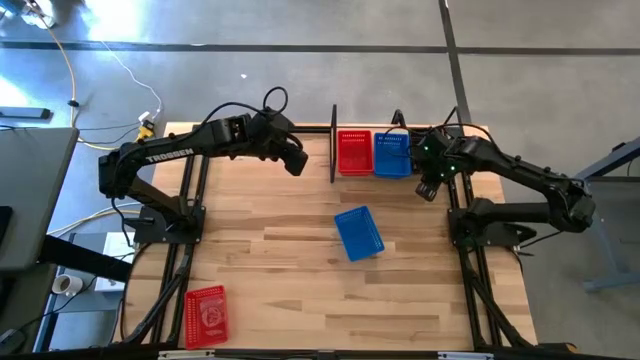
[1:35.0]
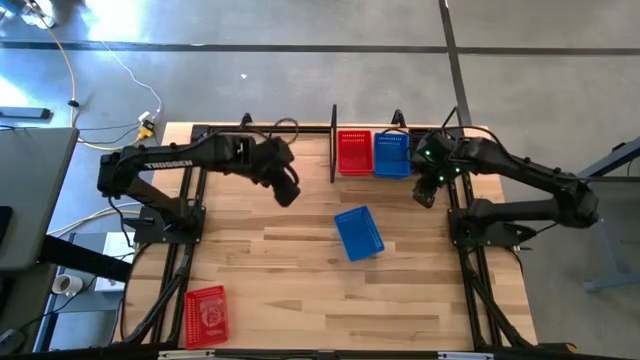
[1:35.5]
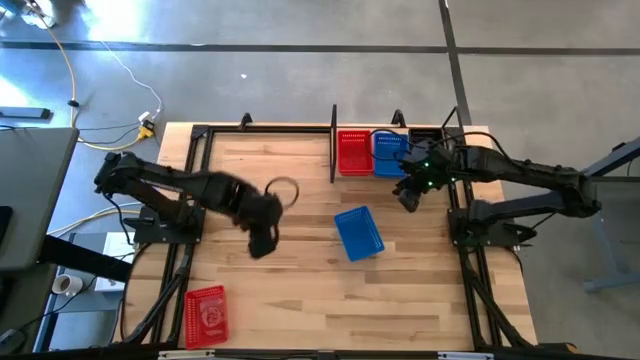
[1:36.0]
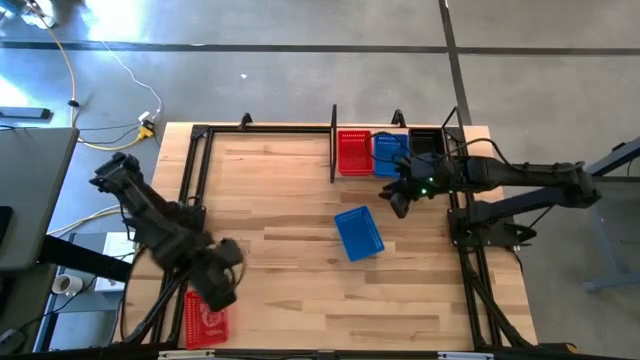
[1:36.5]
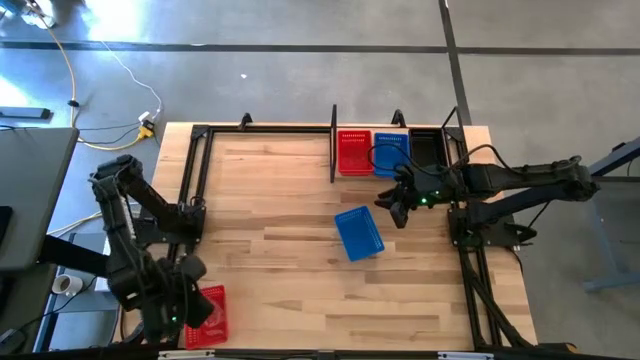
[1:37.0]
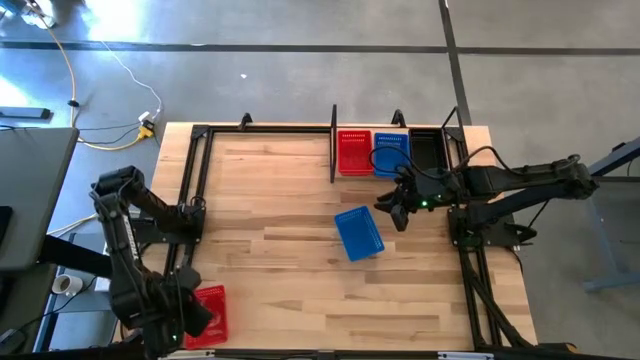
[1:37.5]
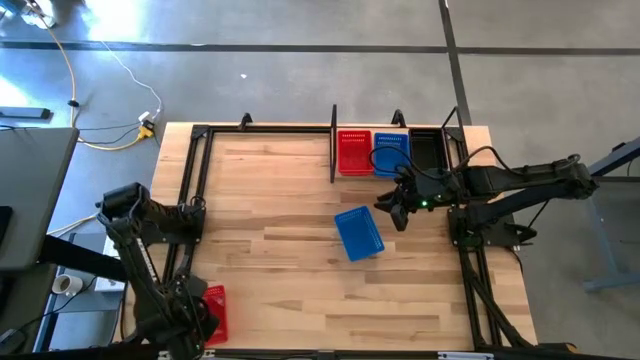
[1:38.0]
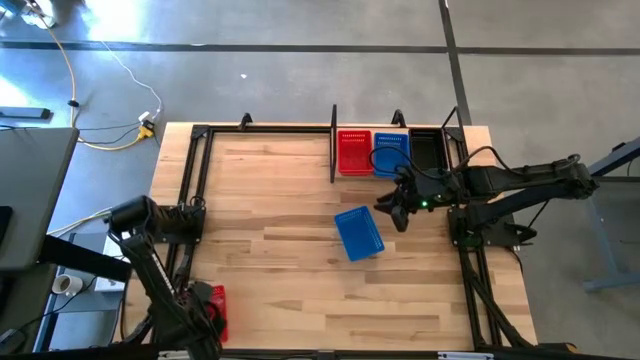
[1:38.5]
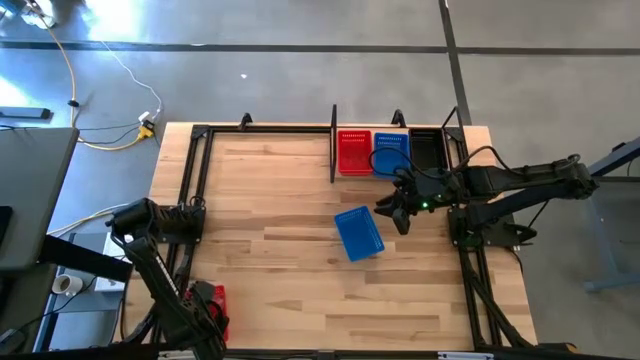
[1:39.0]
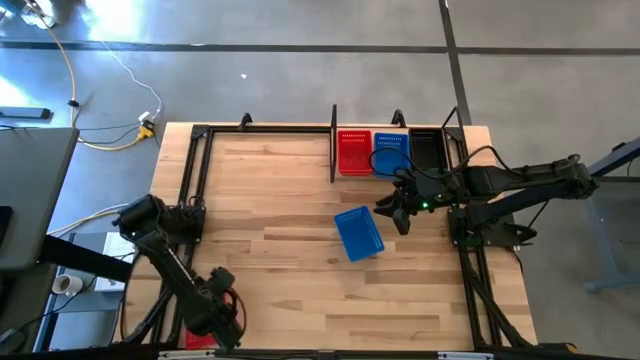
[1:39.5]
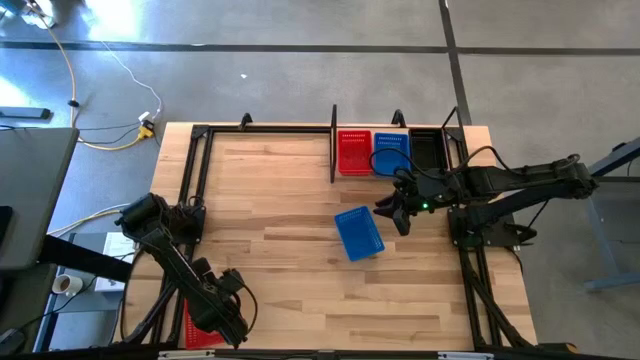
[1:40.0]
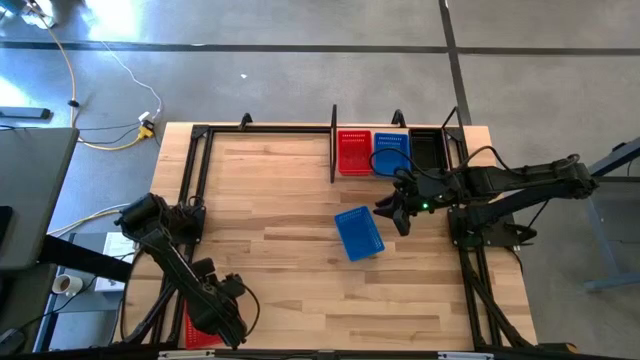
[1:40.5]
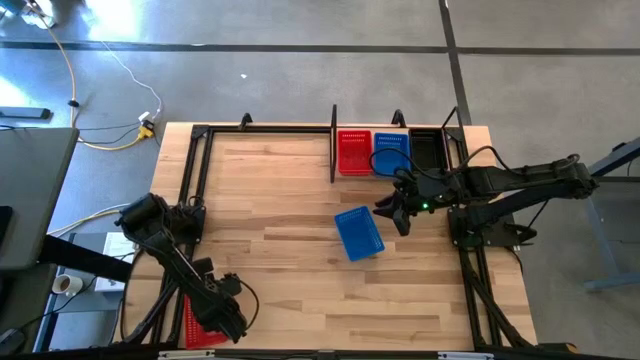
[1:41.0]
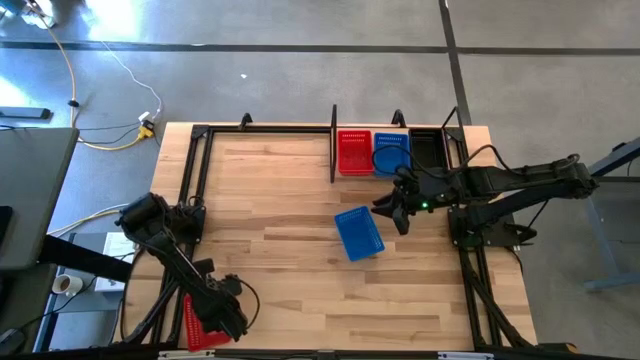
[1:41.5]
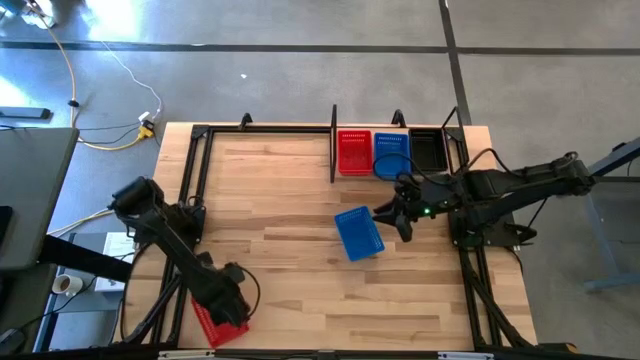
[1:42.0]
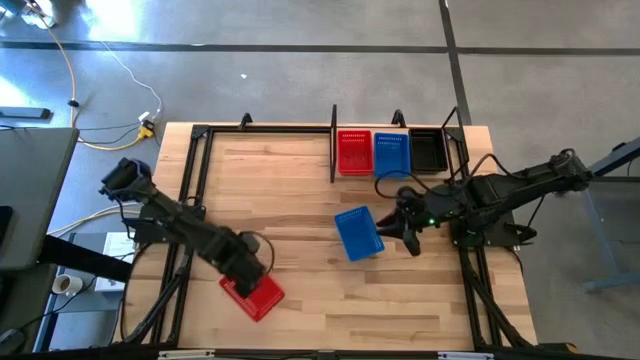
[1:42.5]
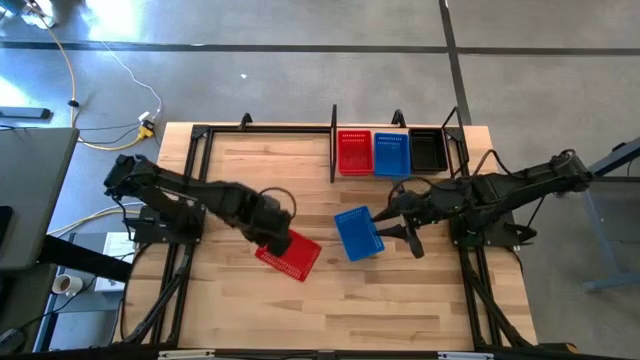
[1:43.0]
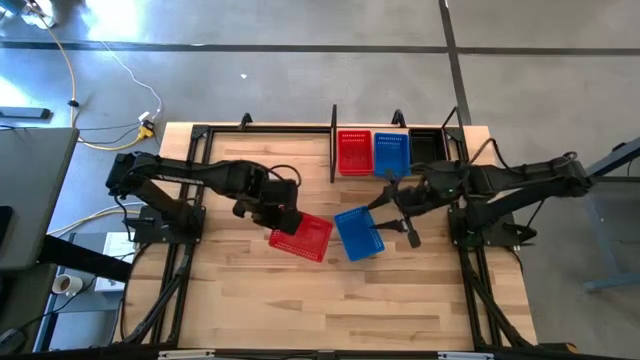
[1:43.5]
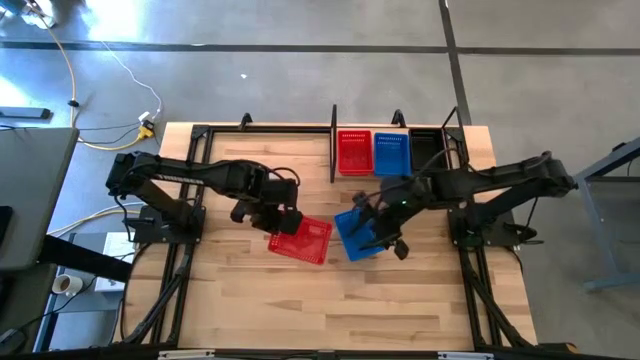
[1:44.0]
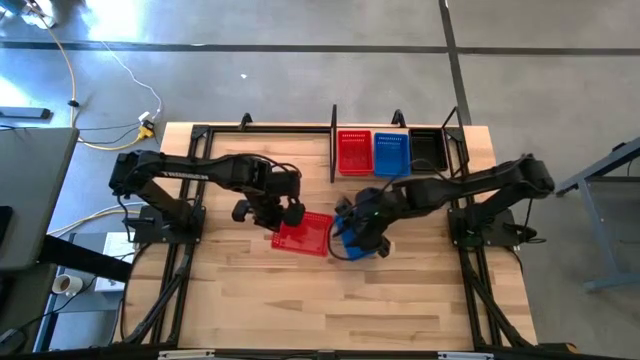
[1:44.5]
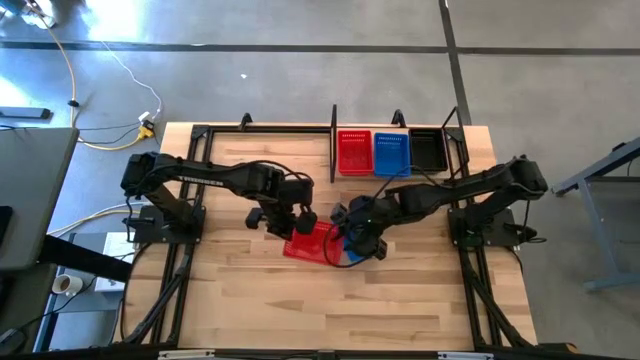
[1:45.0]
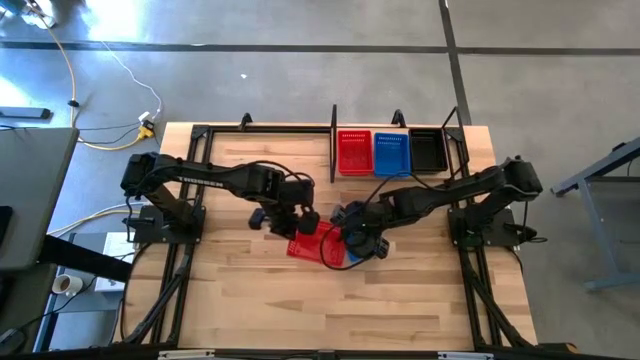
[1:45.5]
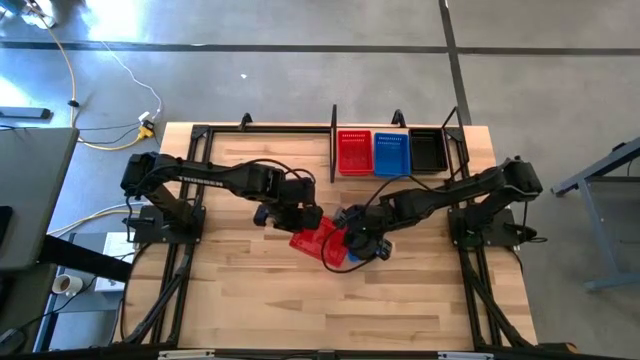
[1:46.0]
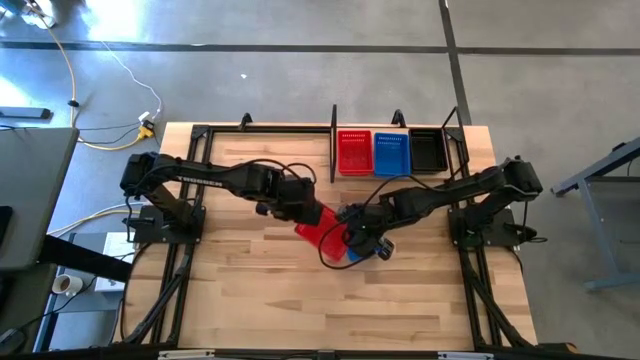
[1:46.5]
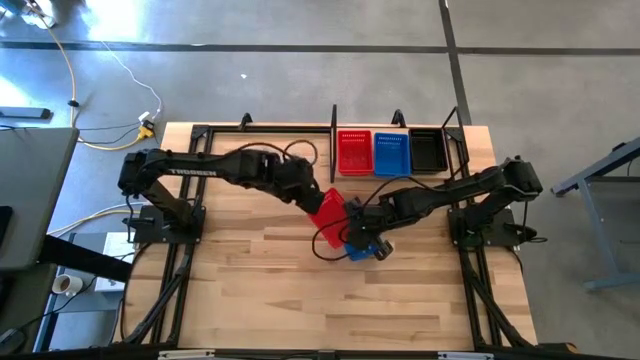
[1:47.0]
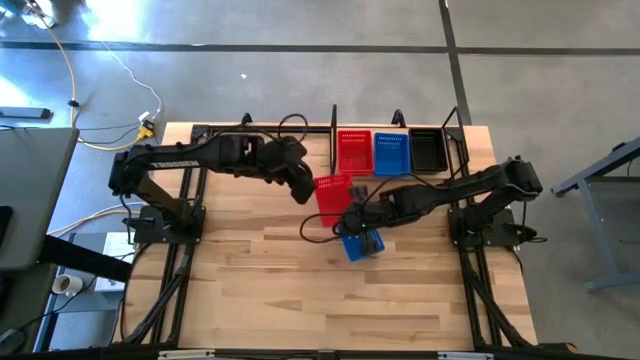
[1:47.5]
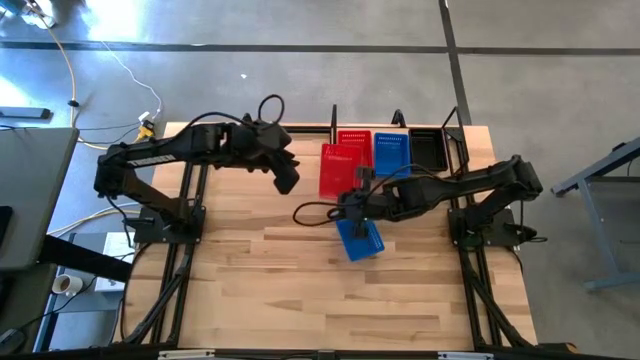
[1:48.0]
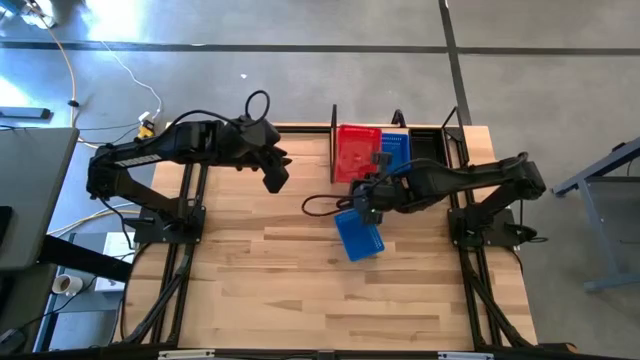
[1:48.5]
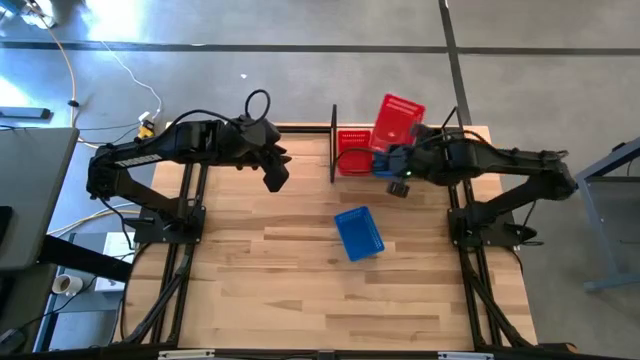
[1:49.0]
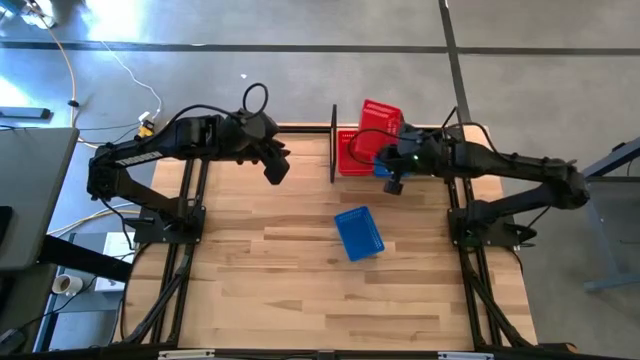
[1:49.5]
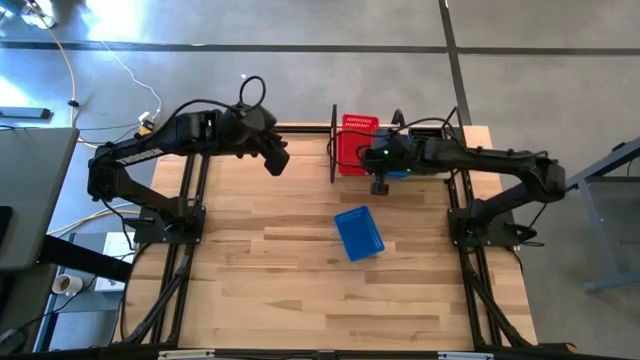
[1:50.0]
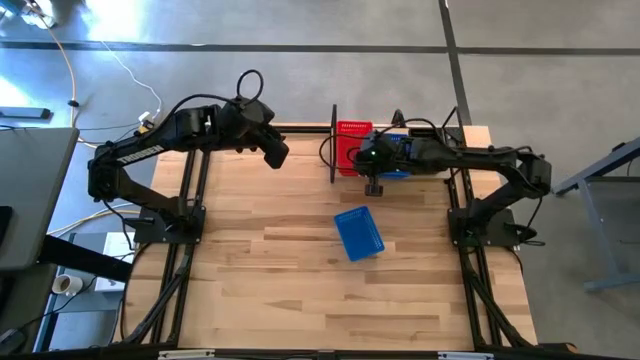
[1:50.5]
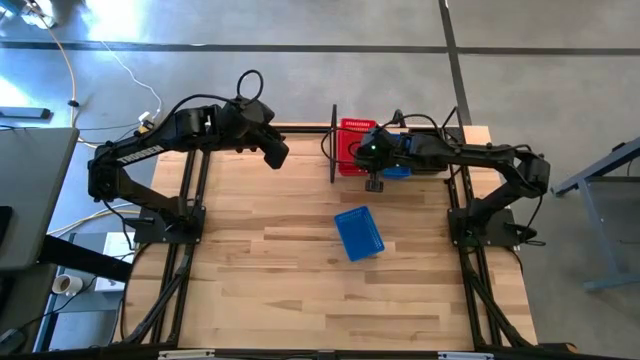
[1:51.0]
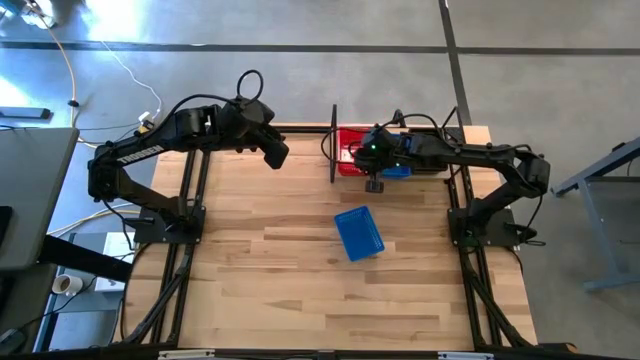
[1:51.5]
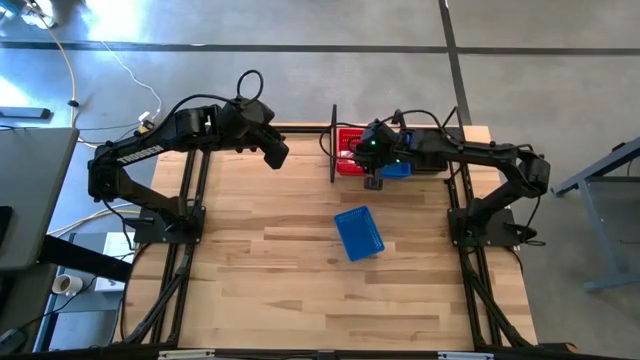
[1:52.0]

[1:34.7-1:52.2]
Task: Stack baskets on shelf by color
Stack the red basket on the stacked red baskets on the shelf

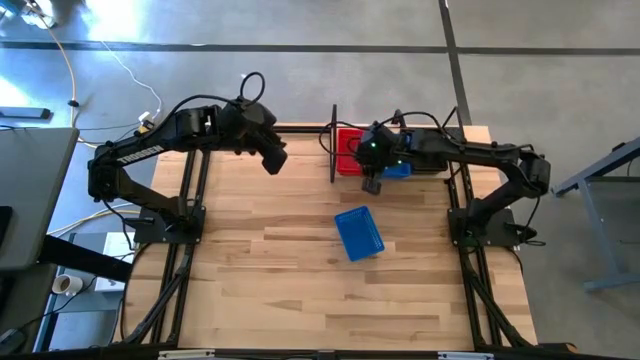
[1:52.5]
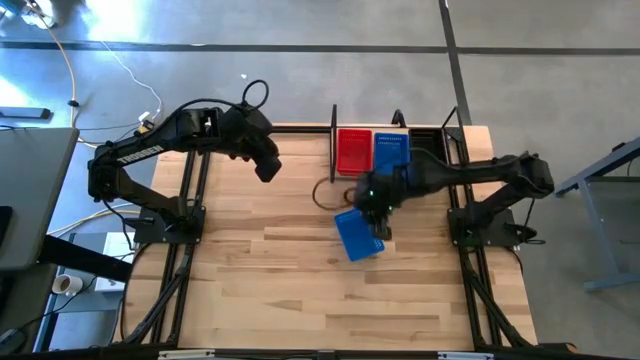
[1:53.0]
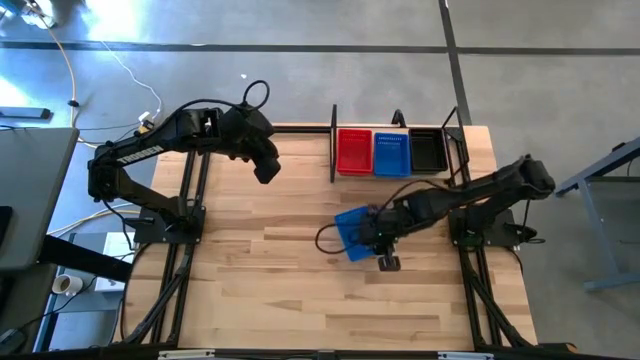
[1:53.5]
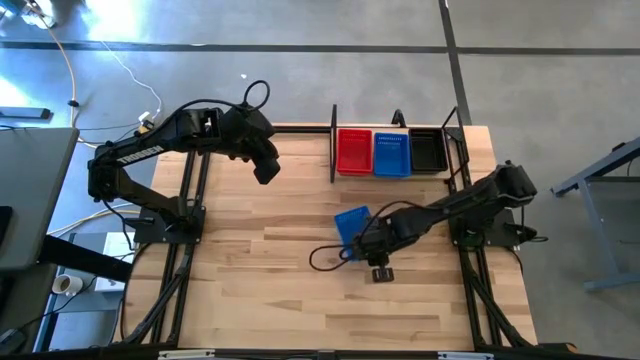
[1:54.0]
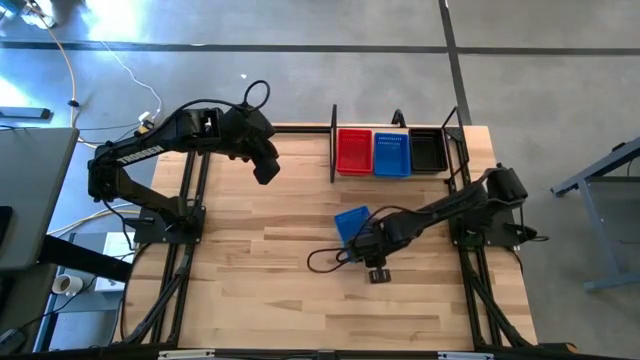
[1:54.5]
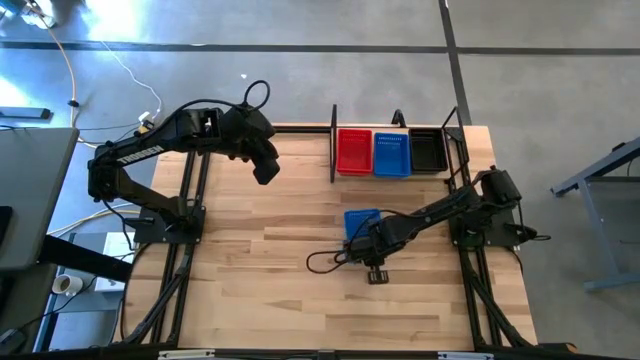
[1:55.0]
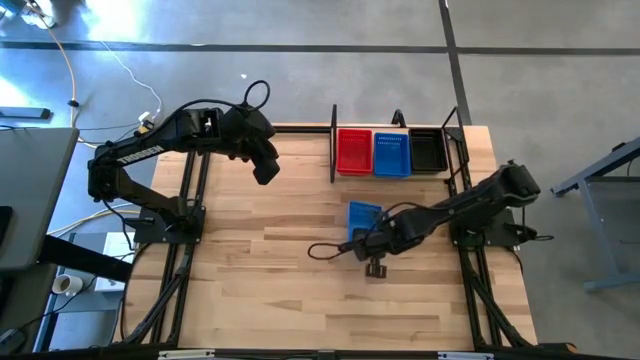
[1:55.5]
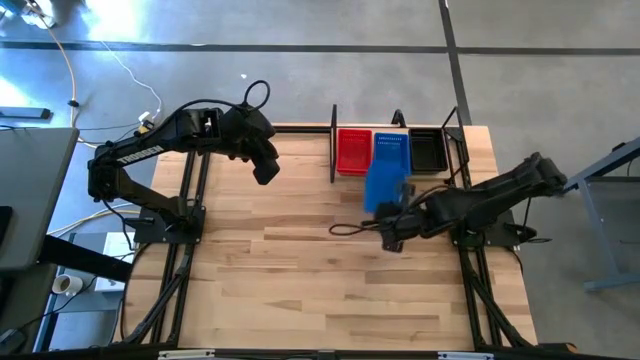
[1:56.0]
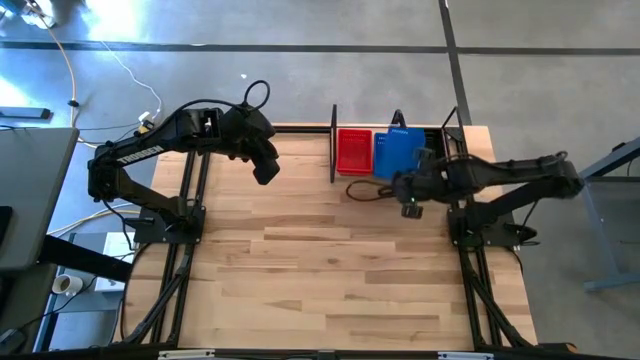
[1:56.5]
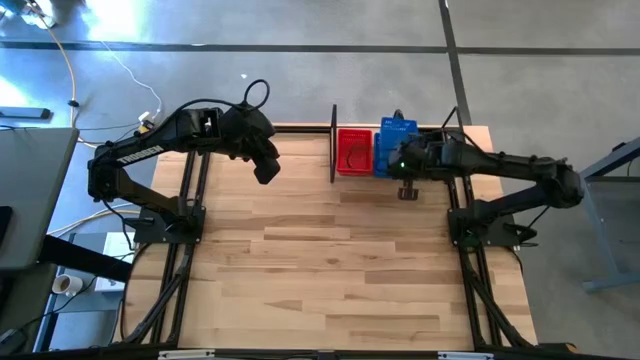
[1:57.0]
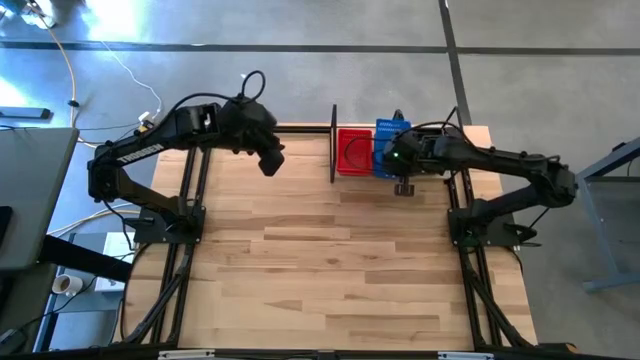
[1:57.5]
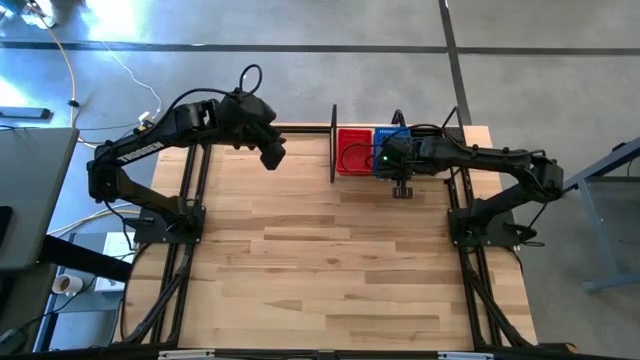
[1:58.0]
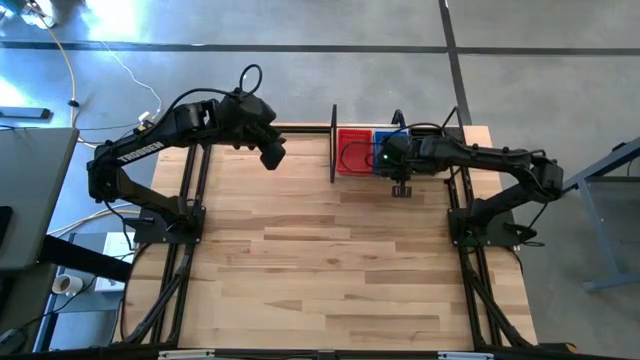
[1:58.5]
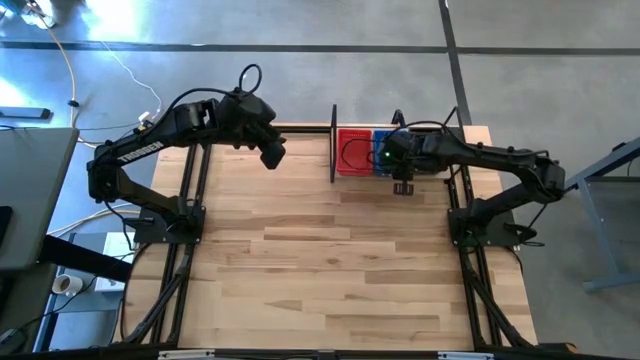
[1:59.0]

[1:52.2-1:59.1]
Stack the blue basket on the stacked blue baskets on the shelf
